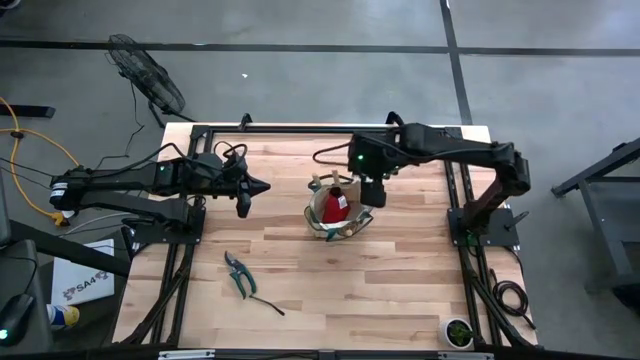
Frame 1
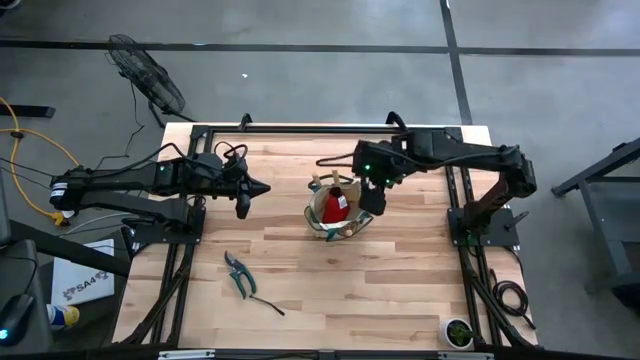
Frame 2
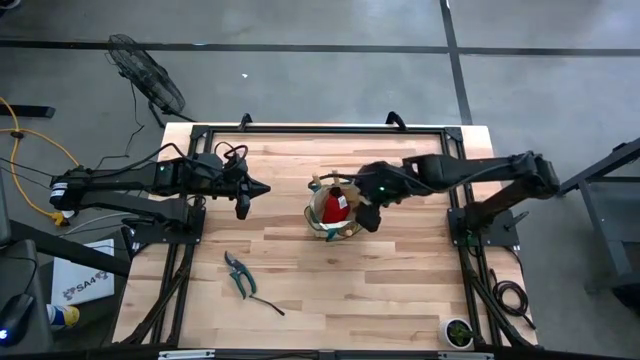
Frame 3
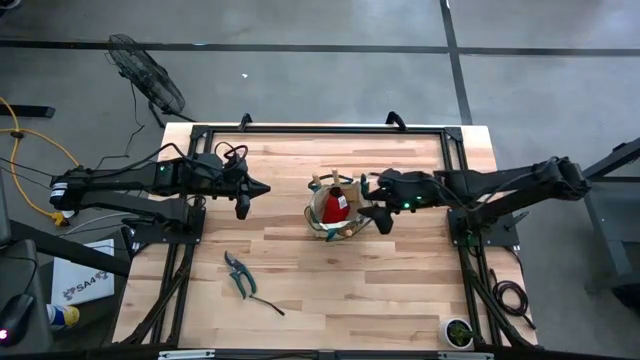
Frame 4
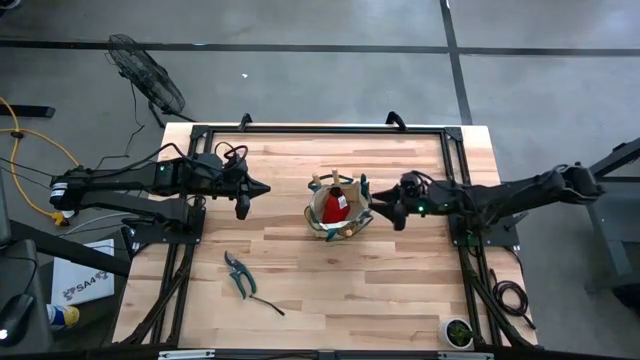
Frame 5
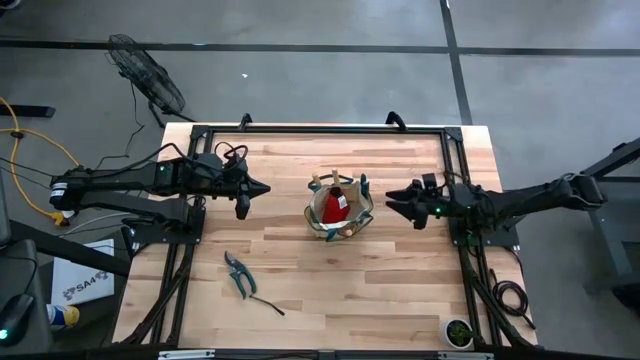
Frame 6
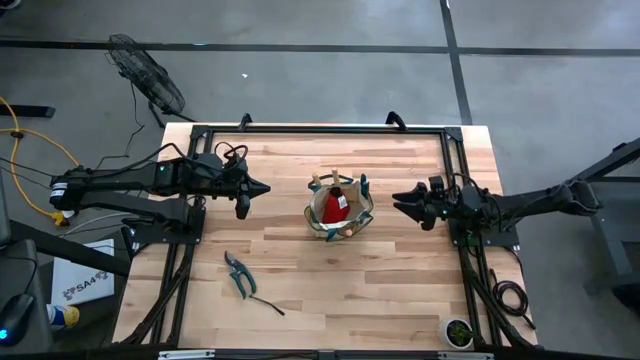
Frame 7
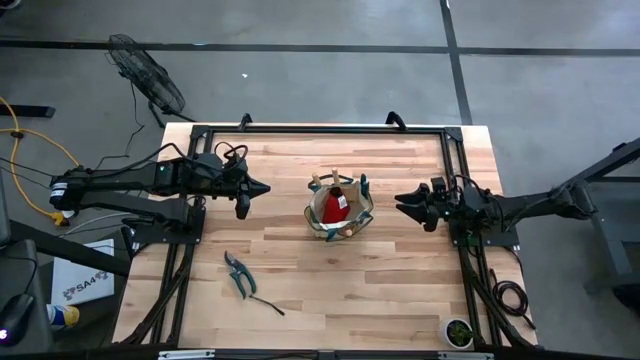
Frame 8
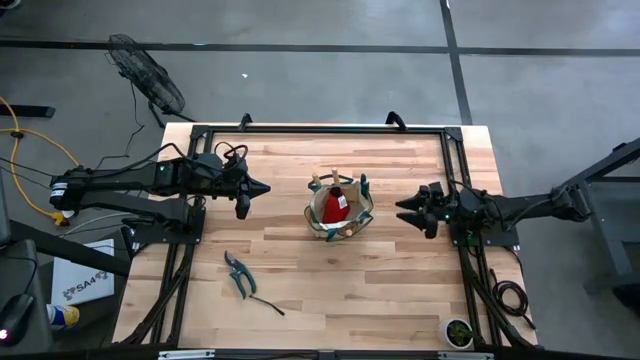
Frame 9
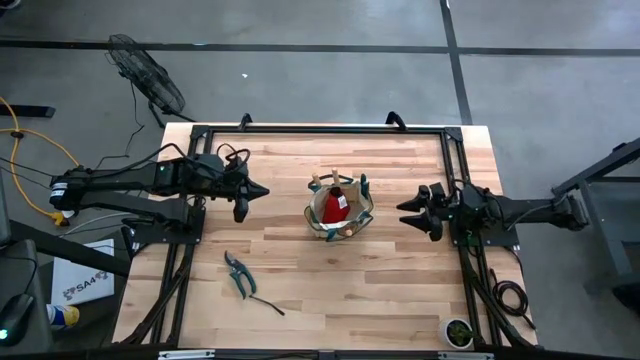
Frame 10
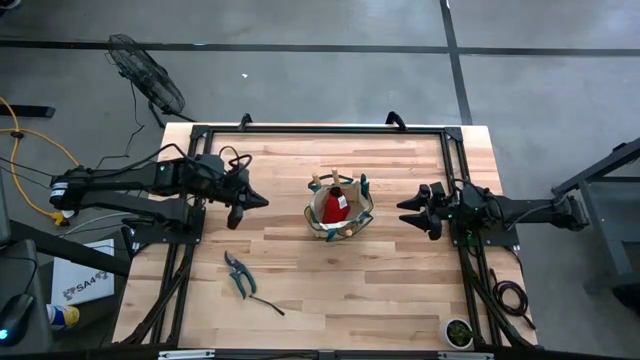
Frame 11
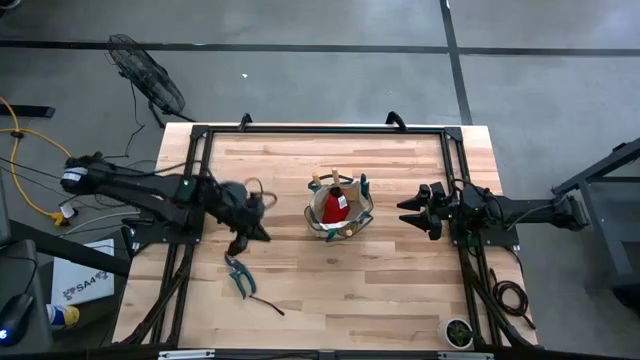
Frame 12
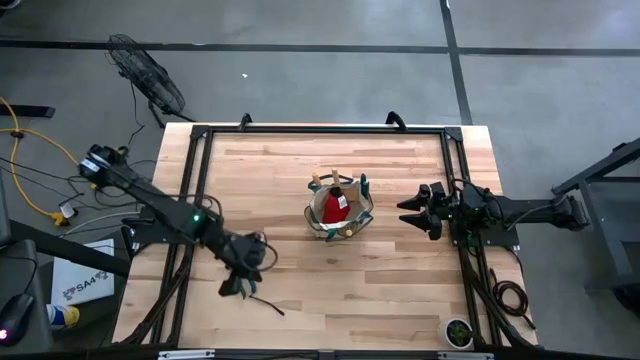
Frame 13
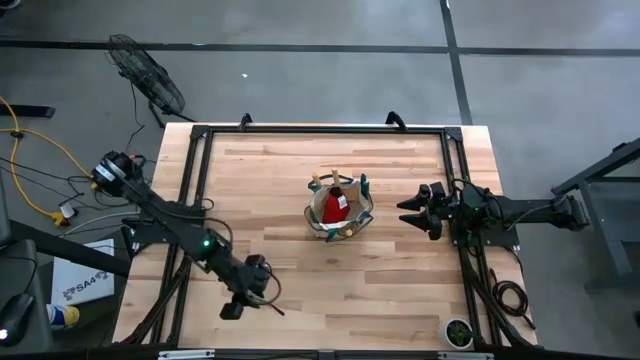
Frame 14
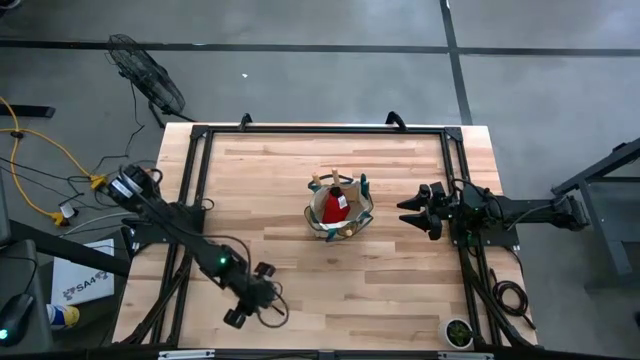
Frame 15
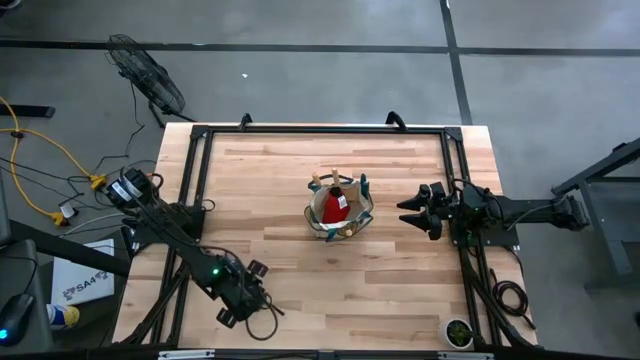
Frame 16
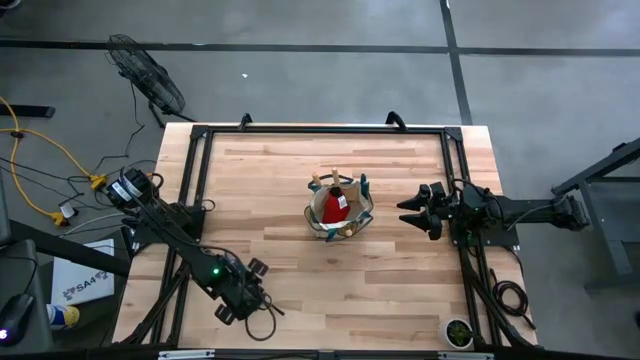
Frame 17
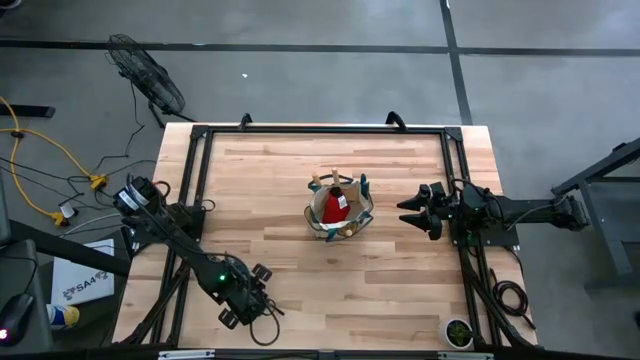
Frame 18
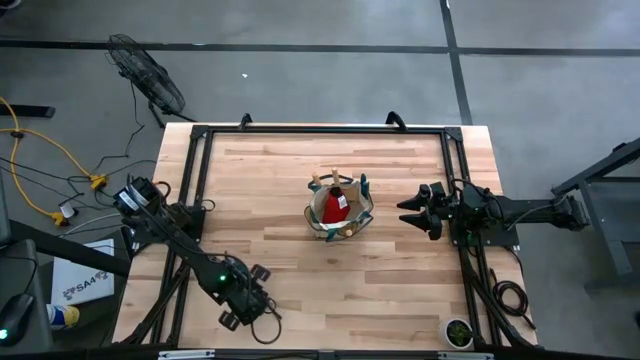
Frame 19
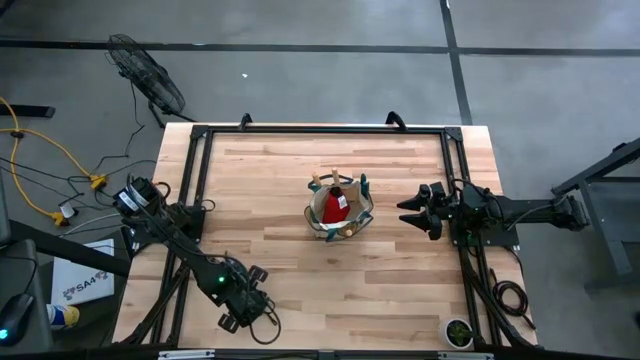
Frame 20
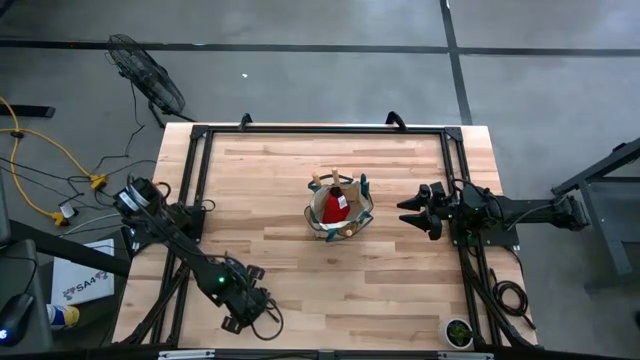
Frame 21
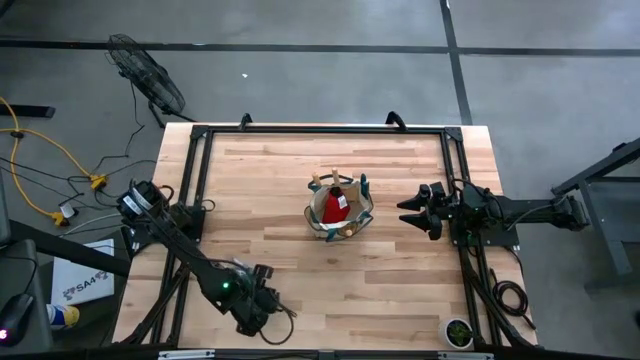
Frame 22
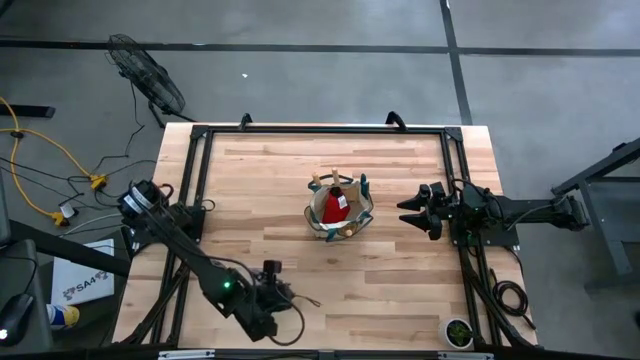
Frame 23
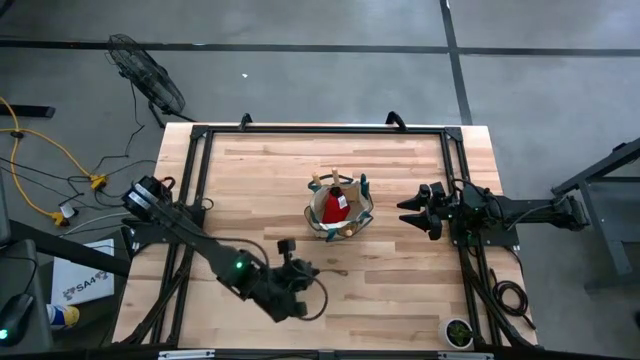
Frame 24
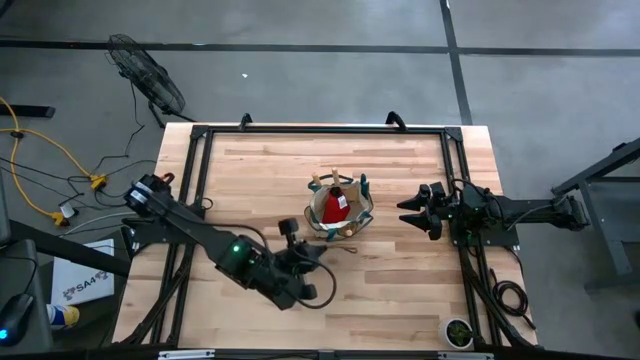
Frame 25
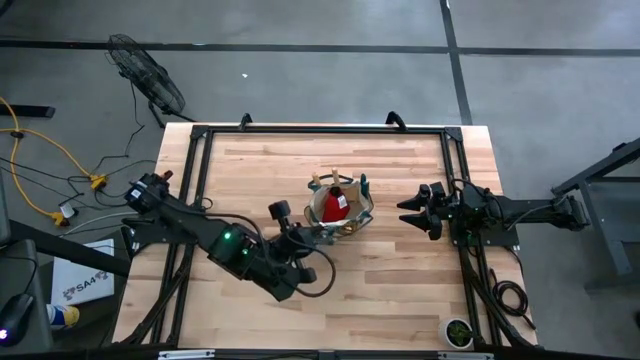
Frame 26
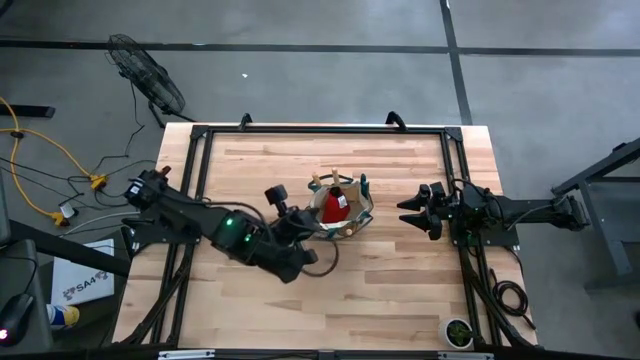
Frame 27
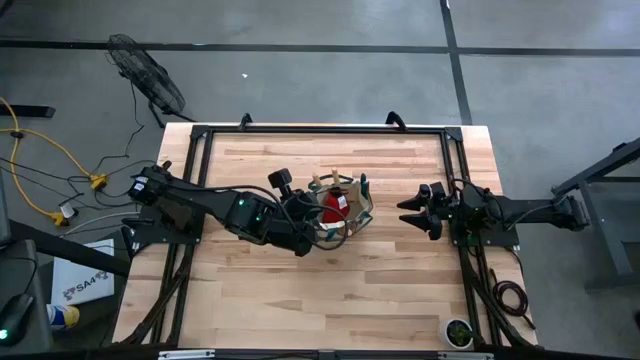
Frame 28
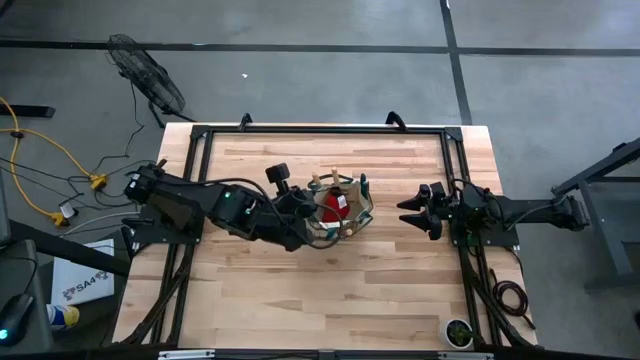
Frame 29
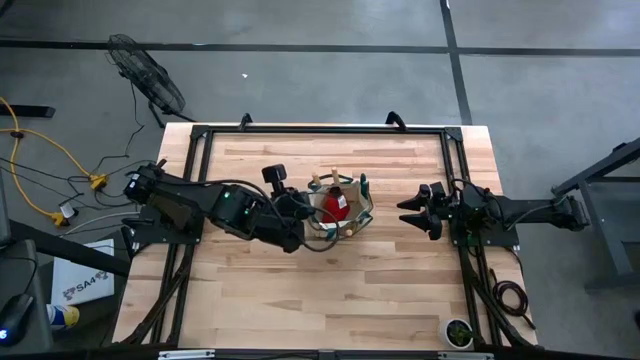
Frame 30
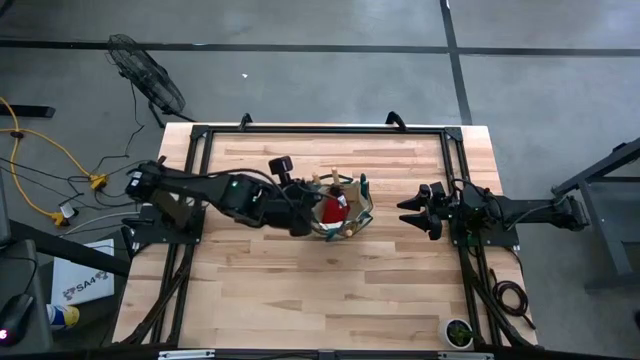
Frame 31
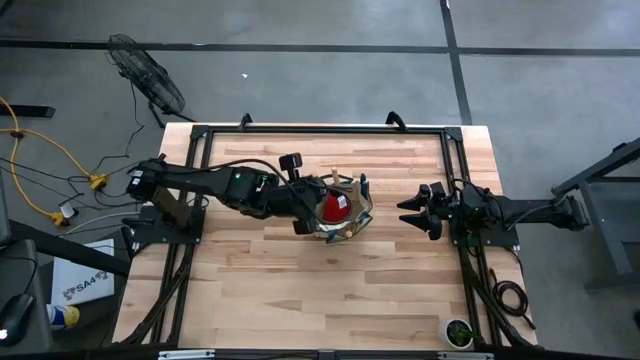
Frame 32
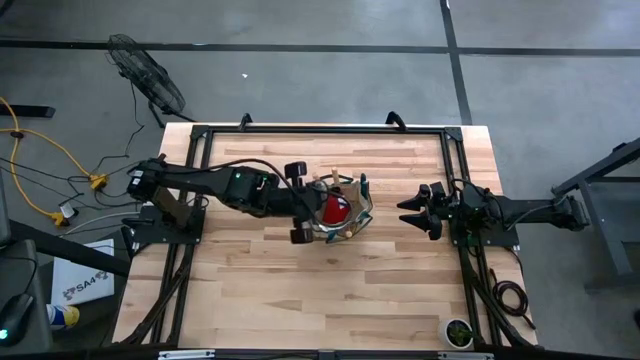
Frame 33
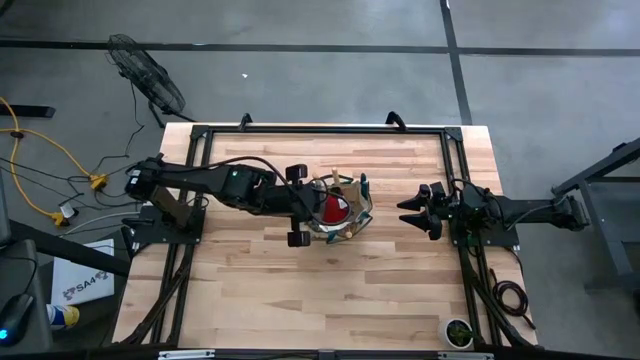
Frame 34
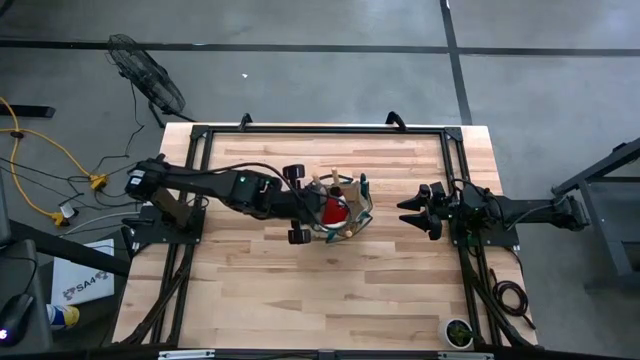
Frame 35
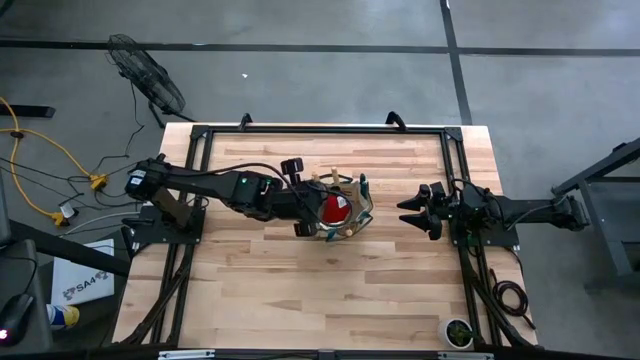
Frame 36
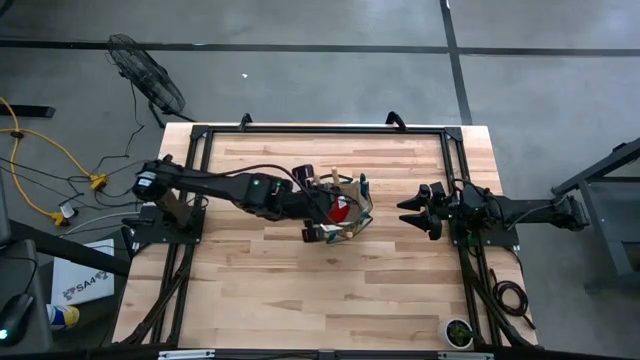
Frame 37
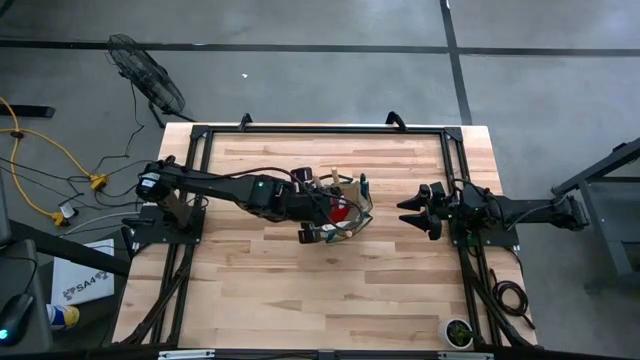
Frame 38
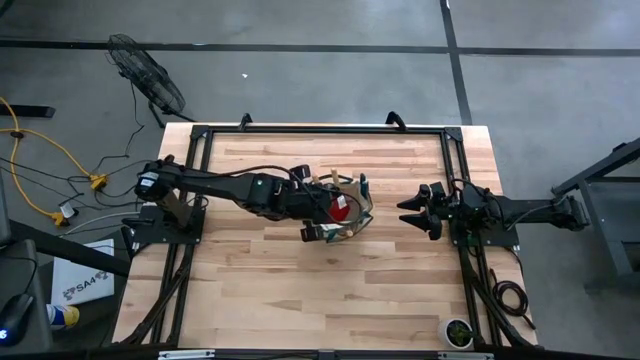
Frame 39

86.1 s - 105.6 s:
Task: Pick & Place Garden tools in Gardening bag
Put the green shears into the brown gardening bag

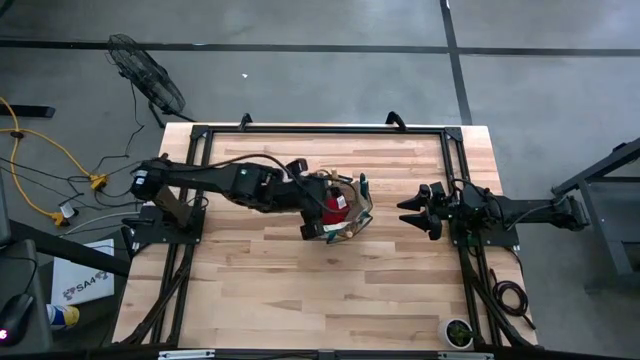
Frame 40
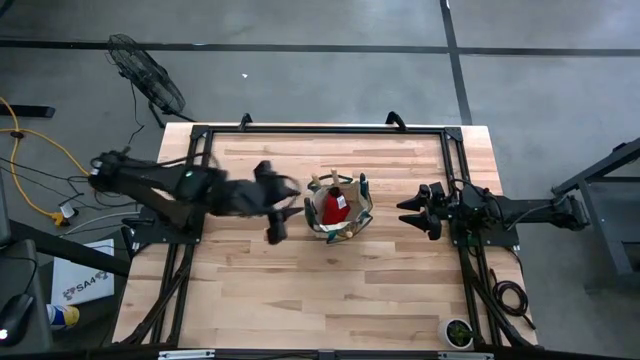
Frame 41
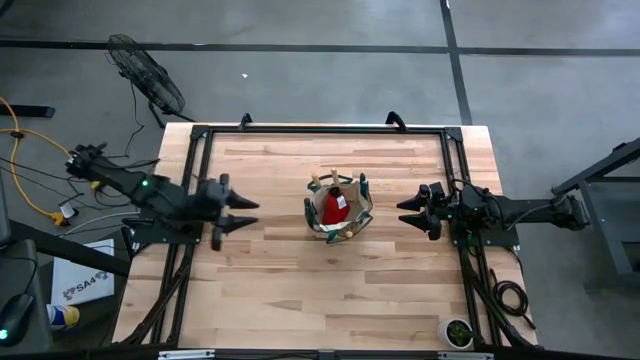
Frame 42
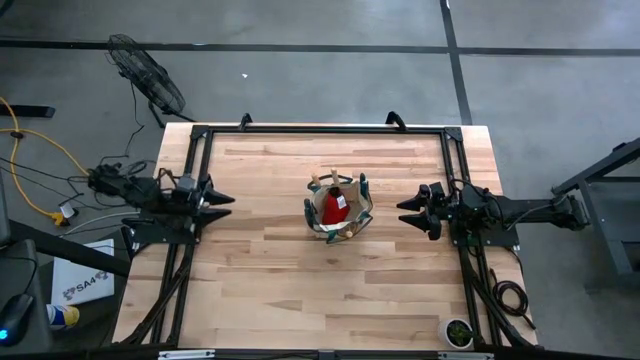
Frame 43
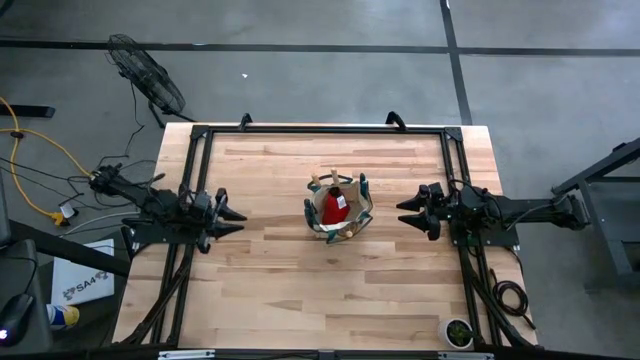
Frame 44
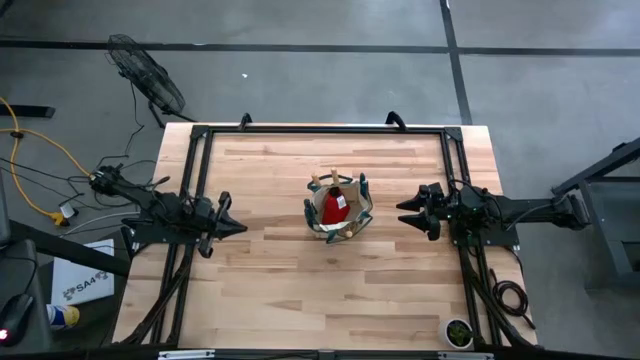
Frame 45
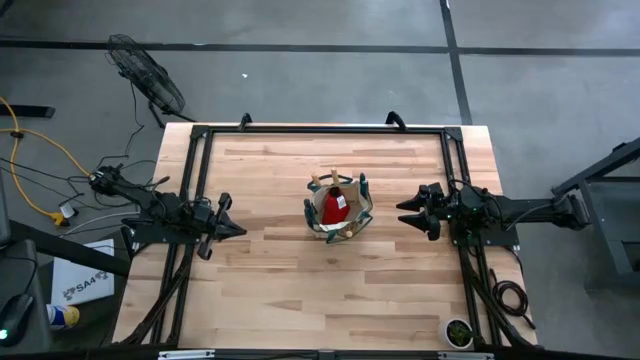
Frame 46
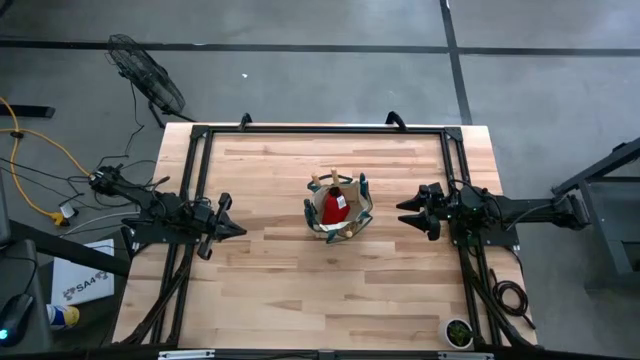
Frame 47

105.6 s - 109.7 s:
Return to Home Position
